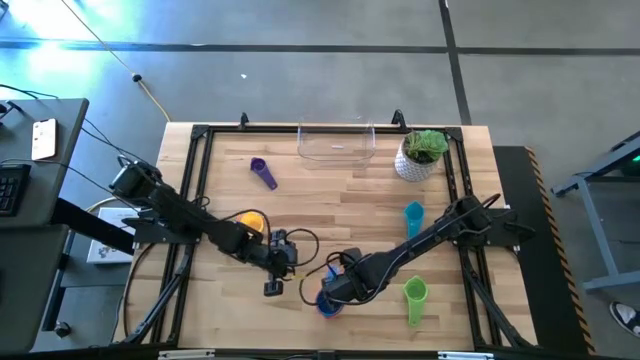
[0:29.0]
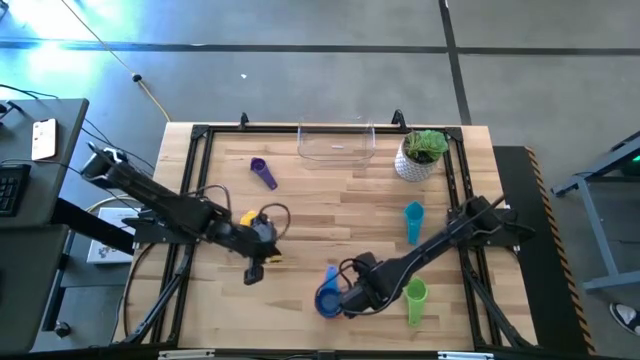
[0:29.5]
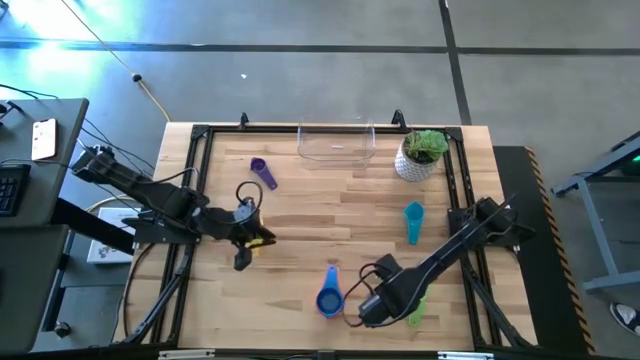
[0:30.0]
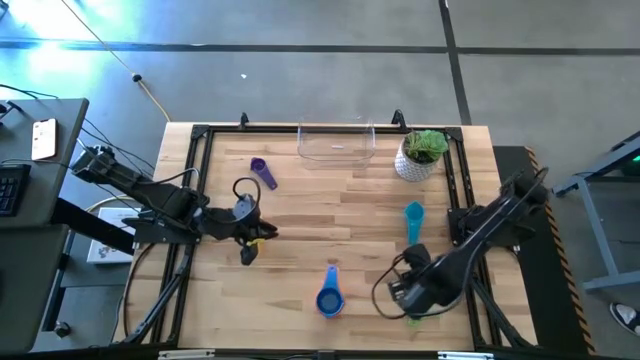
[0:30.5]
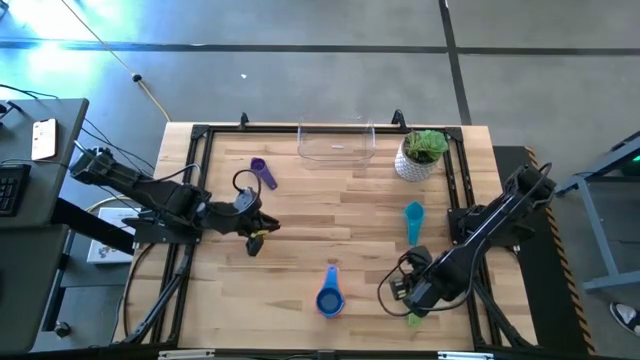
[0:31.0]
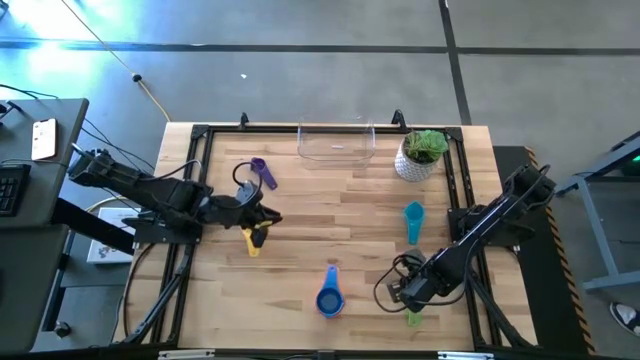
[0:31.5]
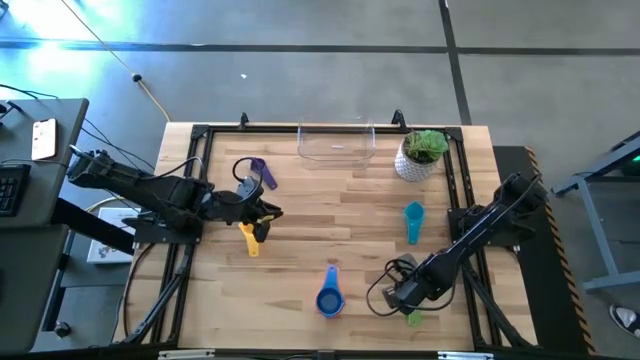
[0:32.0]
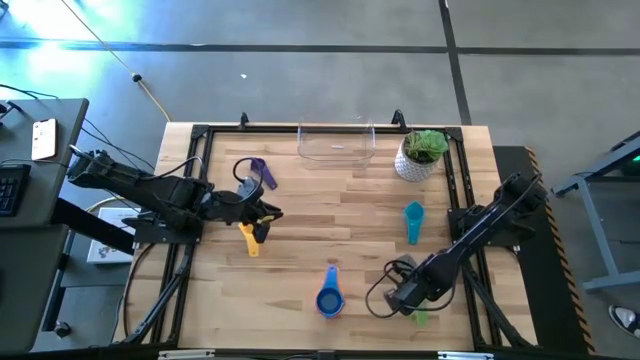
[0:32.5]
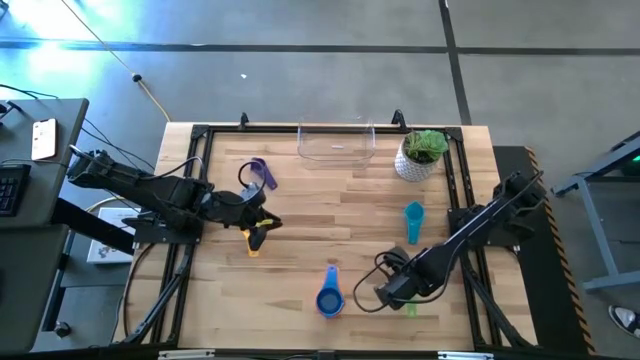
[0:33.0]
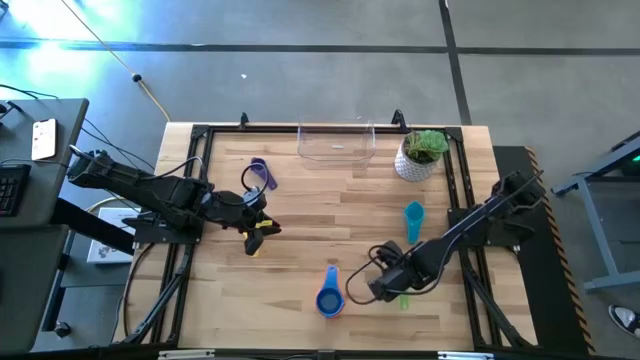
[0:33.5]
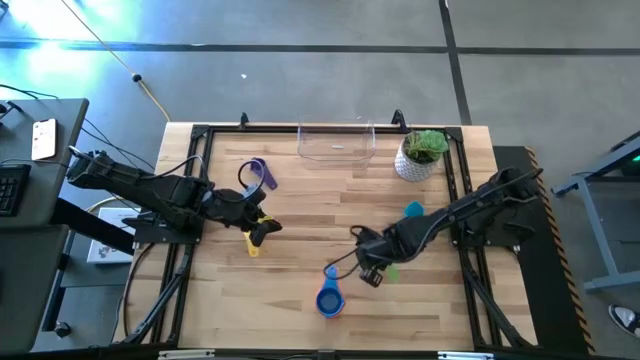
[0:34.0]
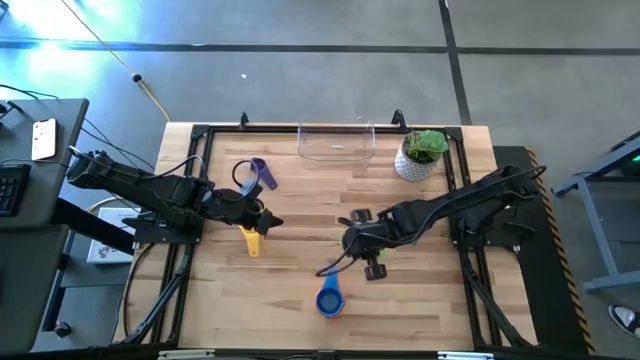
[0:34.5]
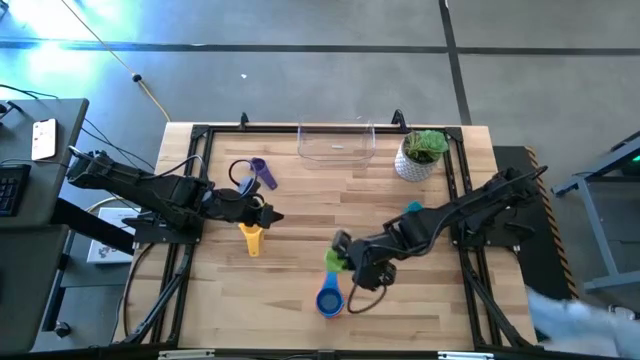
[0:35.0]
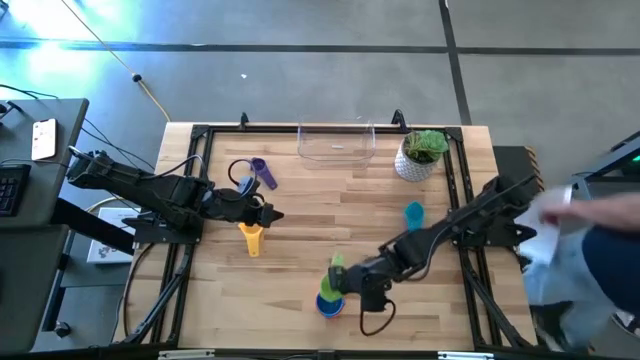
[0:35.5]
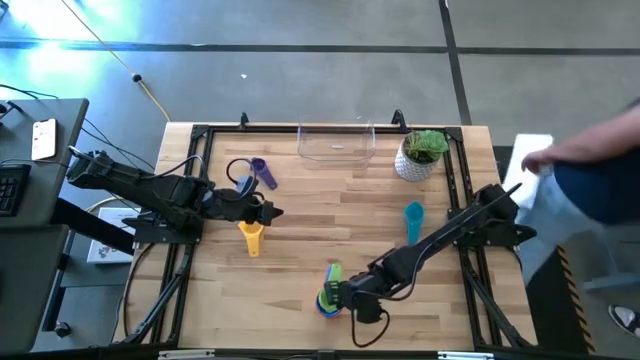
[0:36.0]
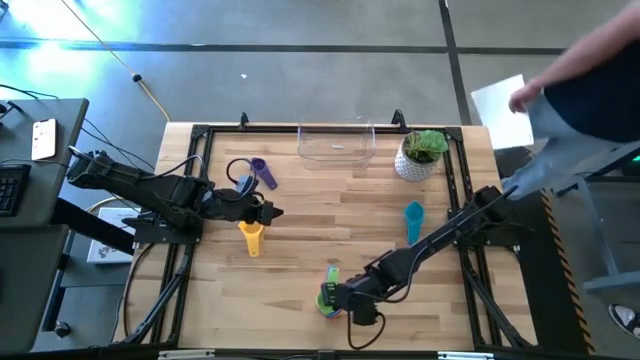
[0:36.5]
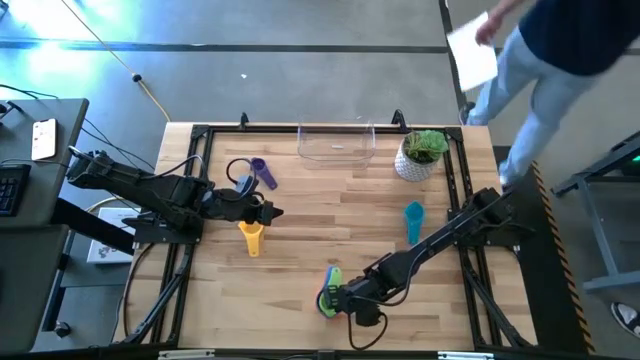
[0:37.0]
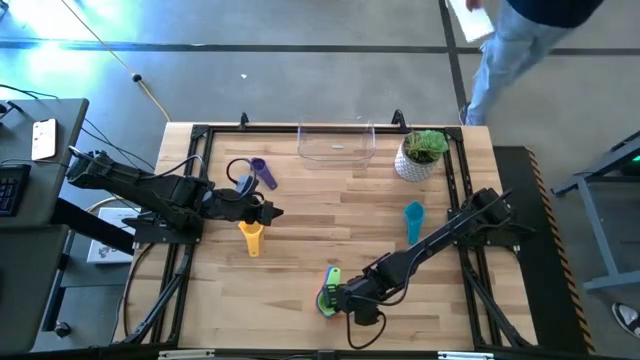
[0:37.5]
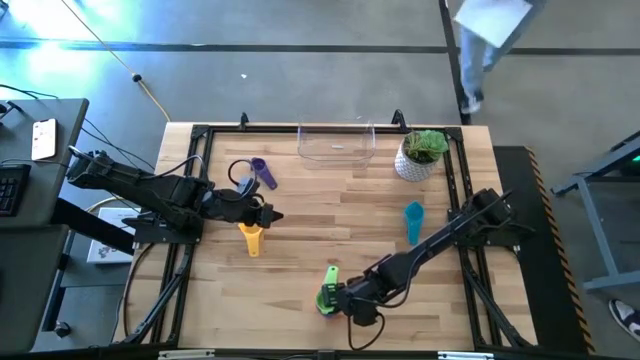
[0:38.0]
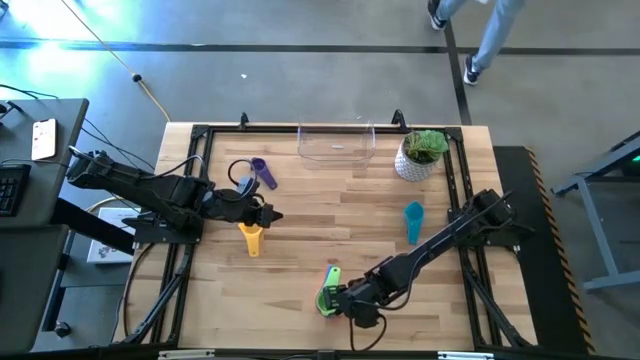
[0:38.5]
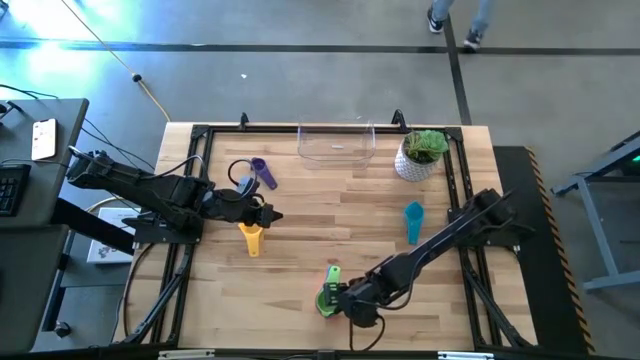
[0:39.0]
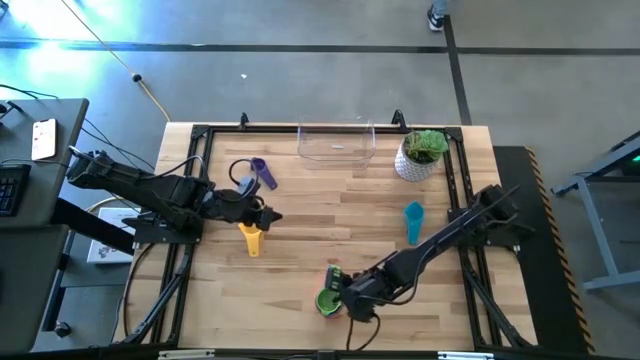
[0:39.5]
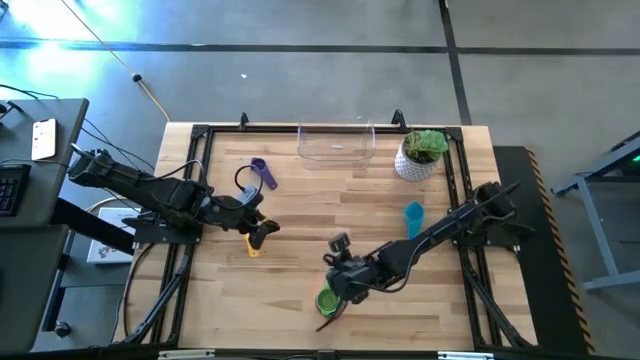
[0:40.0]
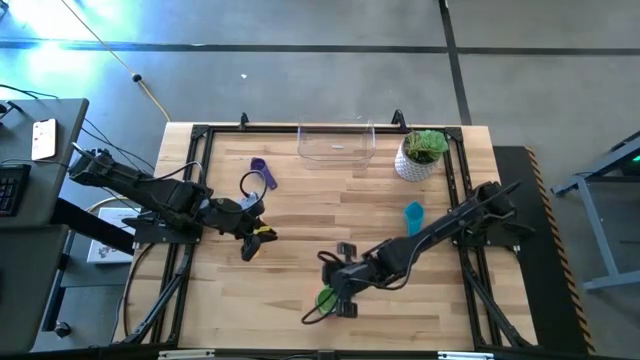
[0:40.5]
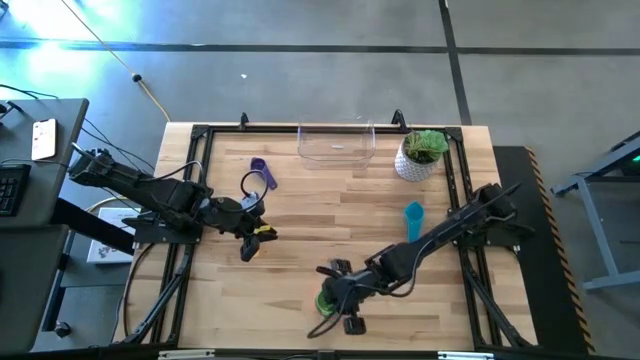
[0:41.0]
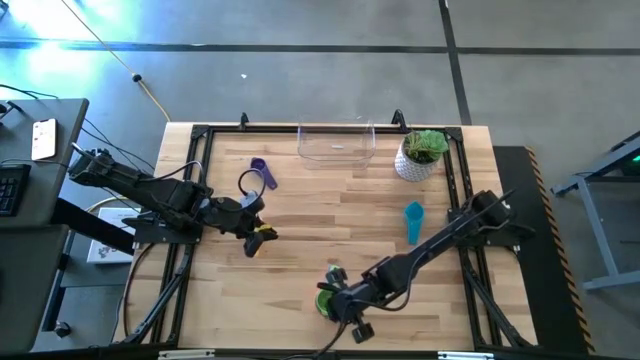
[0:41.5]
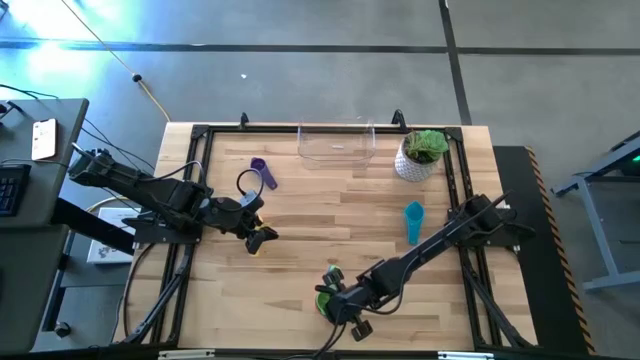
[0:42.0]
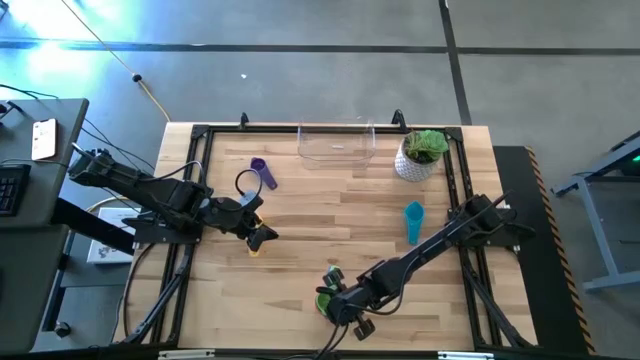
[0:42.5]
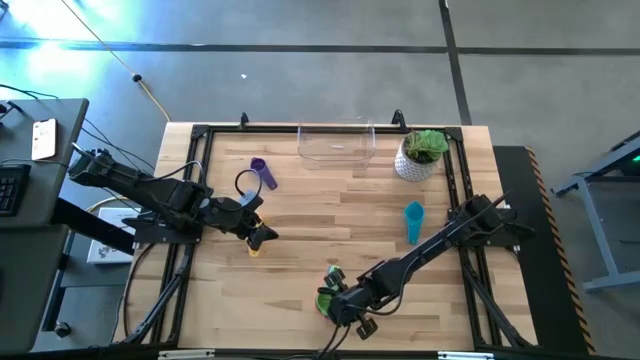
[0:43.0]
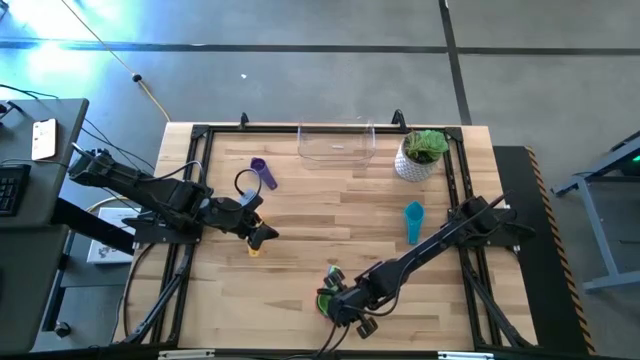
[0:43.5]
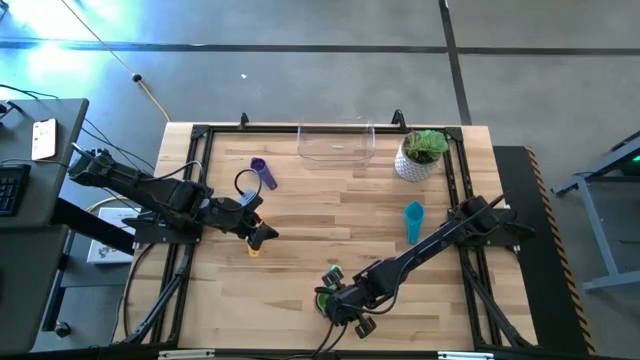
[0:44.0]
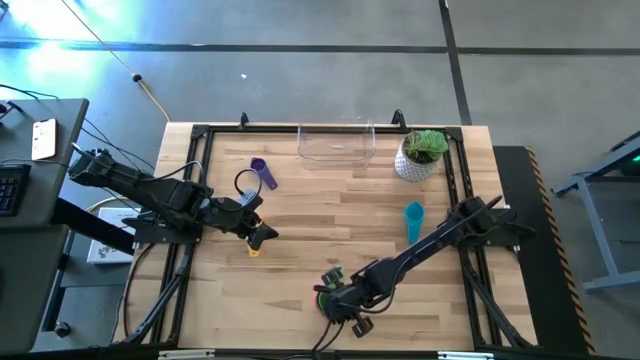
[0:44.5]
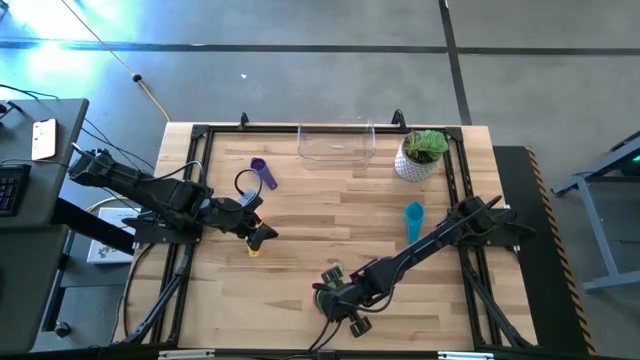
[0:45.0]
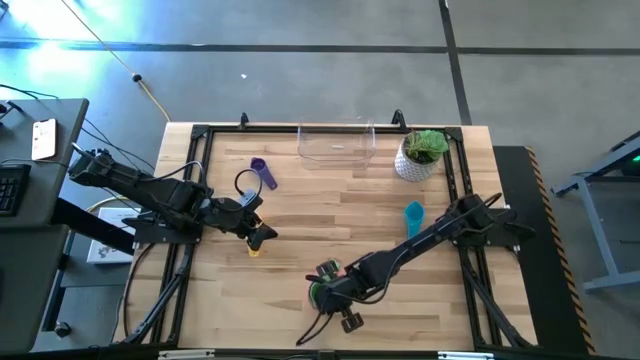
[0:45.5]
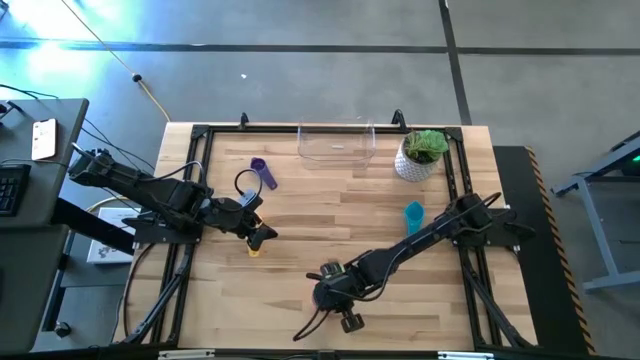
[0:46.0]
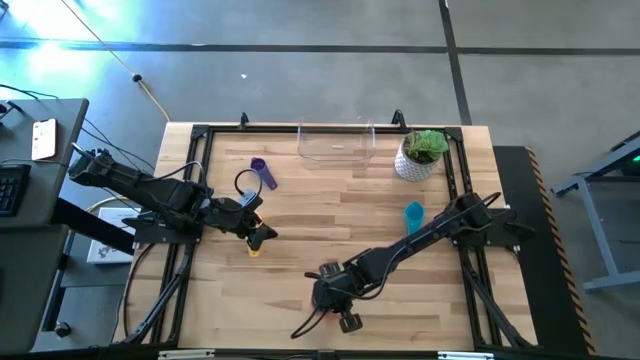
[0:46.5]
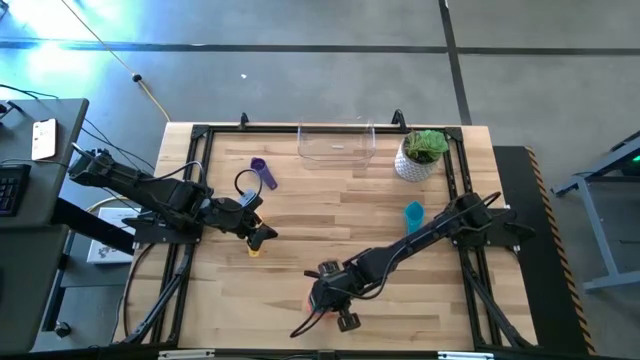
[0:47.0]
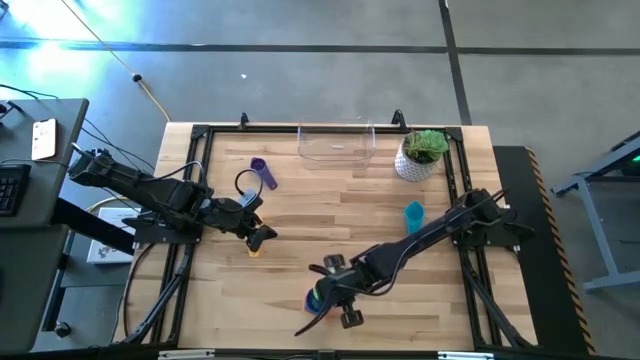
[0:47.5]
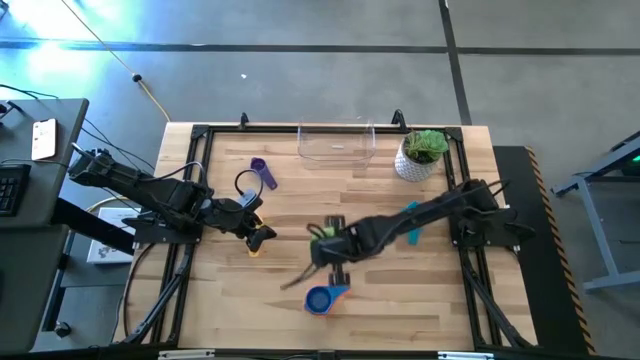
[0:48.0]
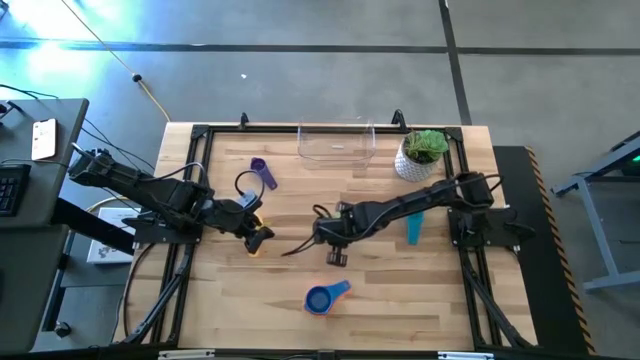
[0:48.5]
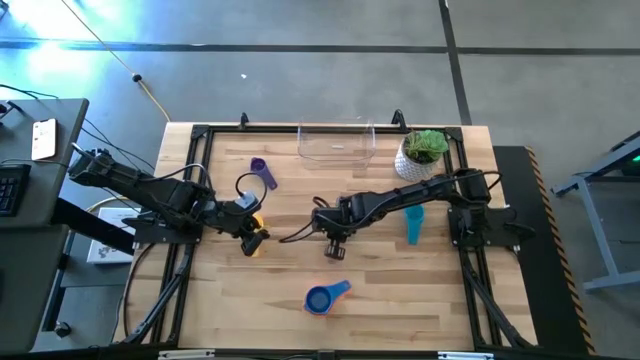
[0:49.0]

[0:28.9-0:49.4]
Task: Nest measuring cups in basket
Stack the green measuring cup on top of the blue measuring cup
